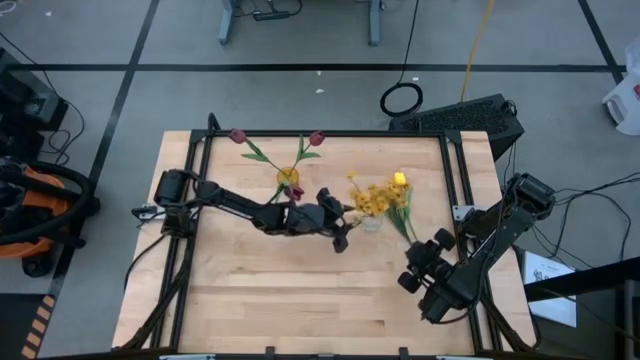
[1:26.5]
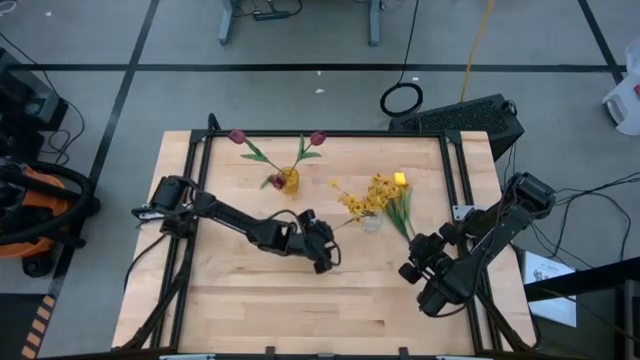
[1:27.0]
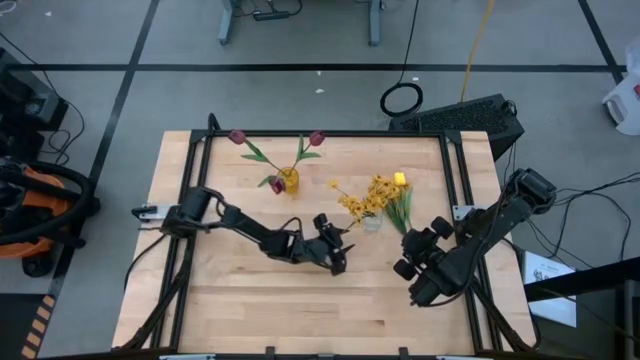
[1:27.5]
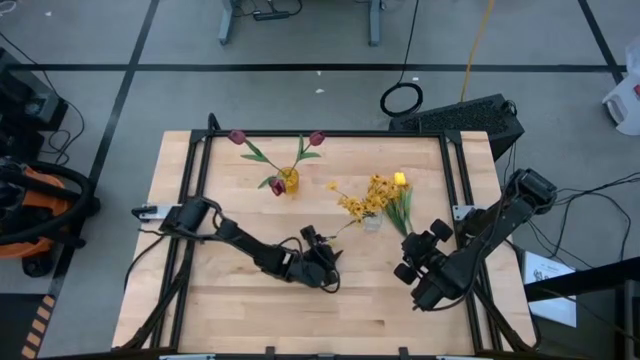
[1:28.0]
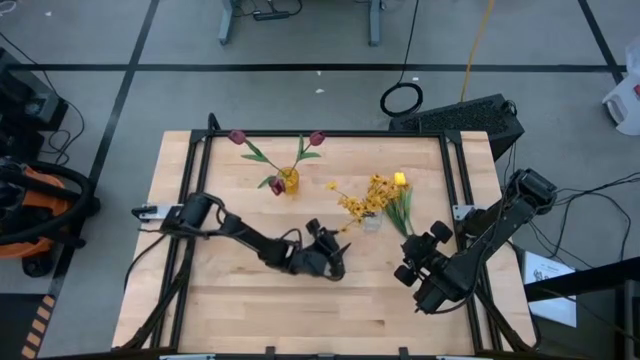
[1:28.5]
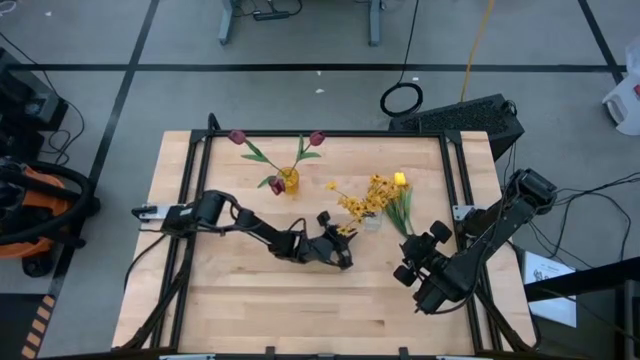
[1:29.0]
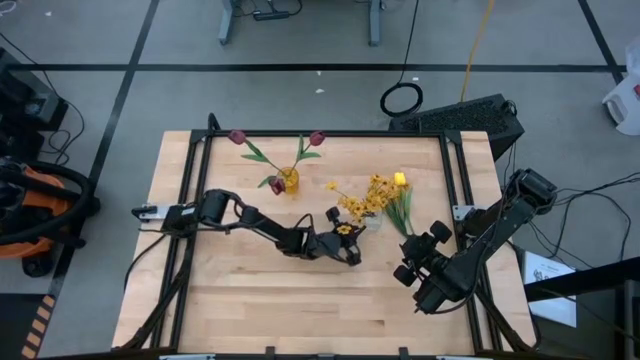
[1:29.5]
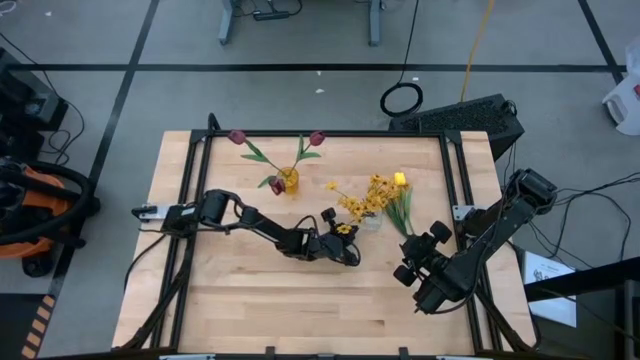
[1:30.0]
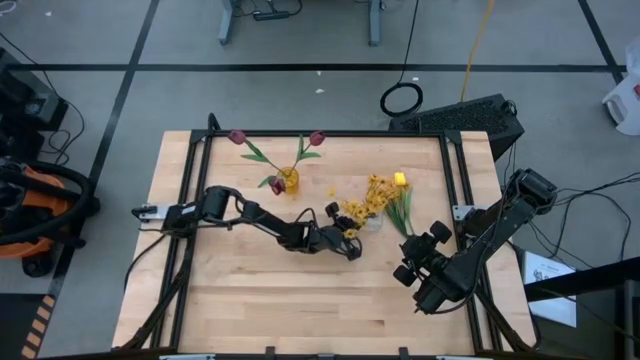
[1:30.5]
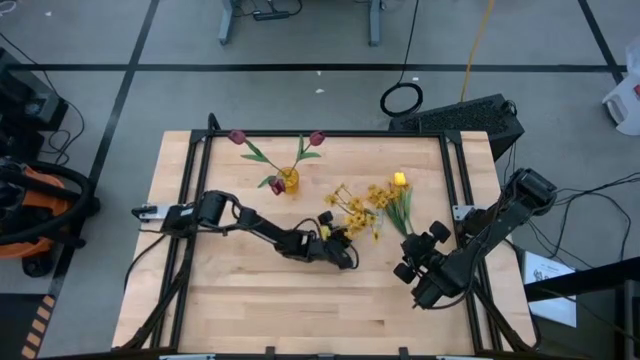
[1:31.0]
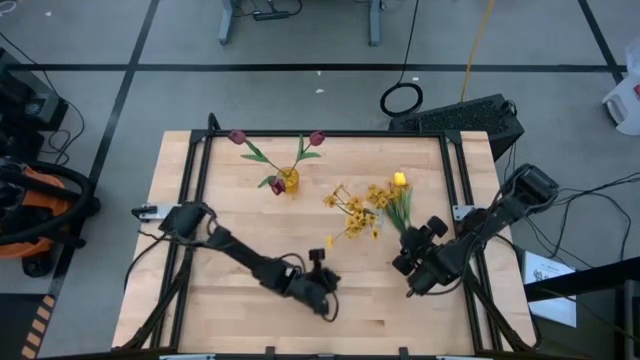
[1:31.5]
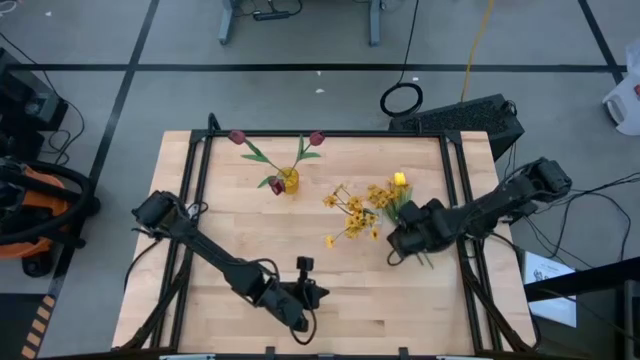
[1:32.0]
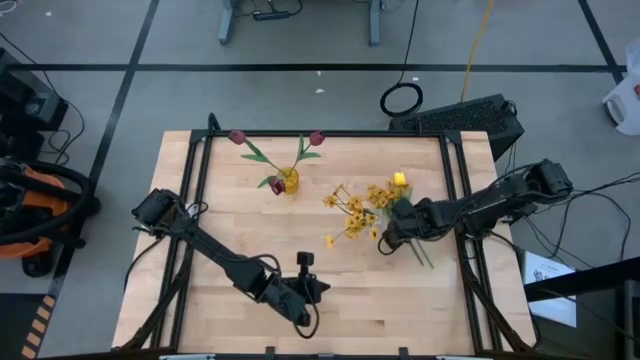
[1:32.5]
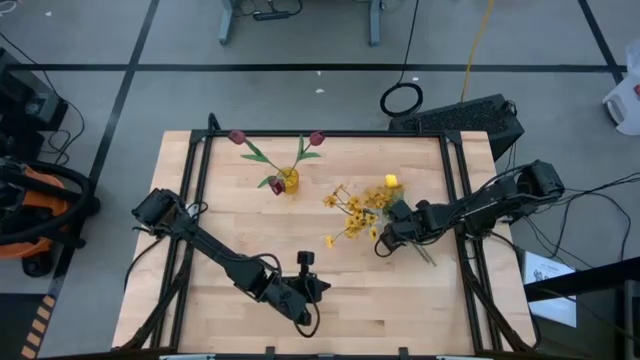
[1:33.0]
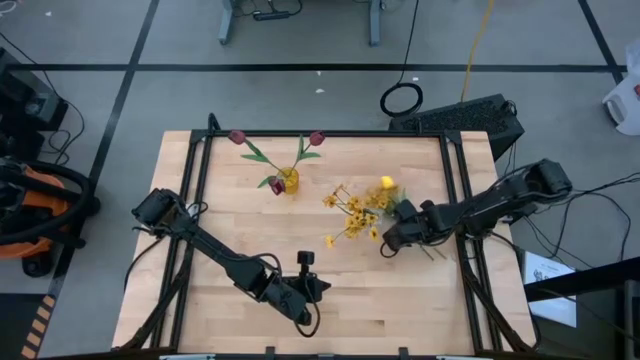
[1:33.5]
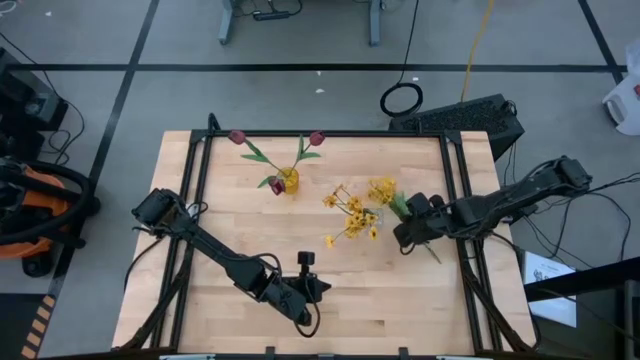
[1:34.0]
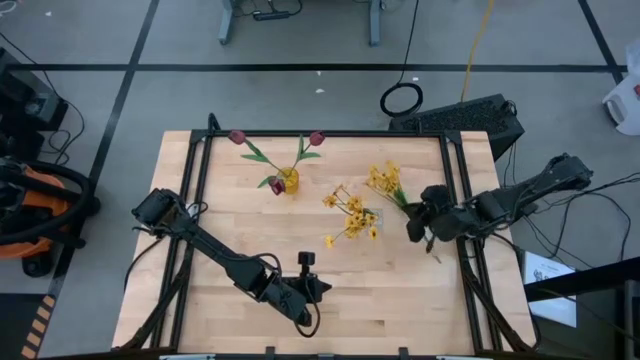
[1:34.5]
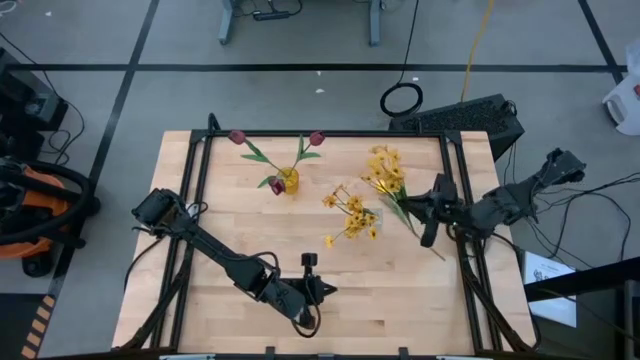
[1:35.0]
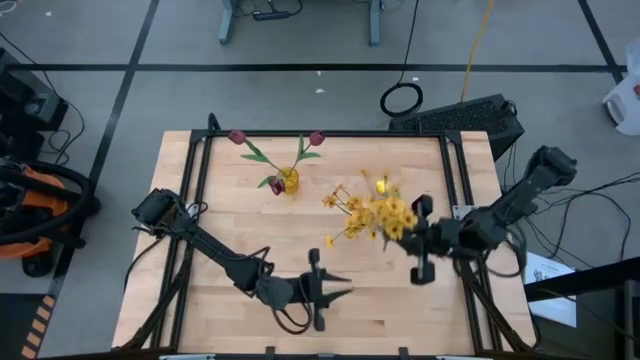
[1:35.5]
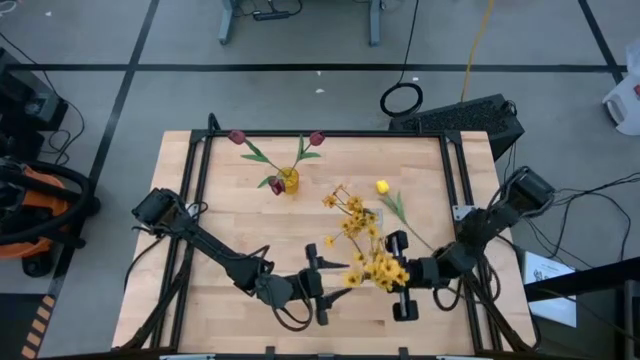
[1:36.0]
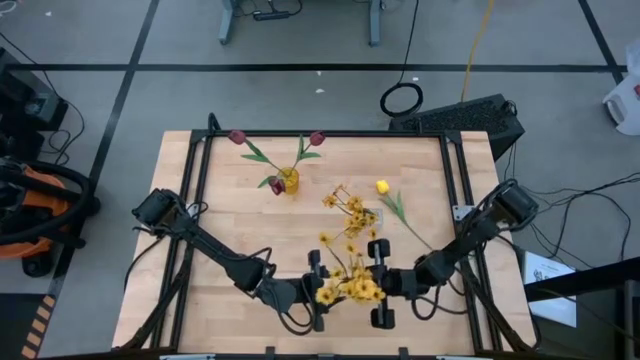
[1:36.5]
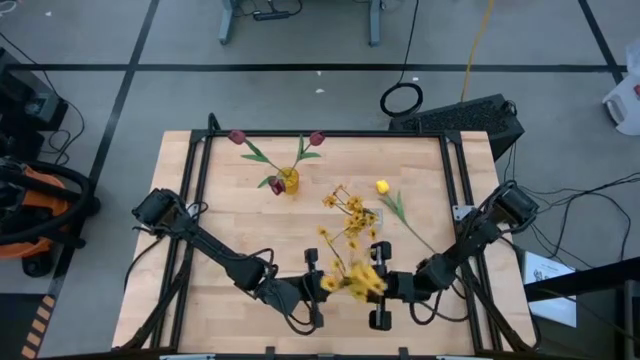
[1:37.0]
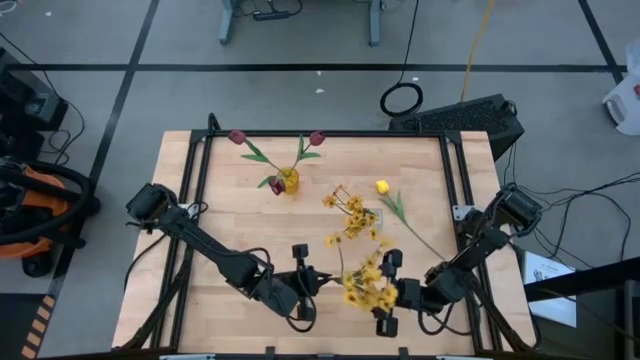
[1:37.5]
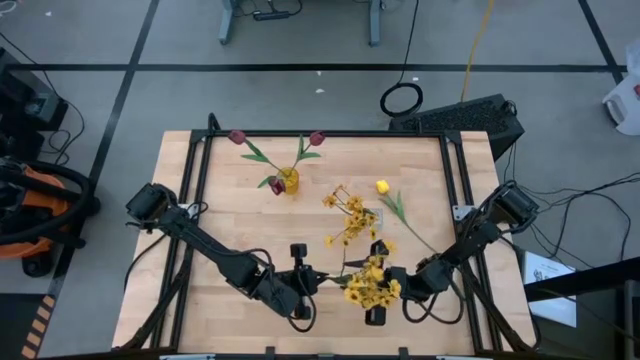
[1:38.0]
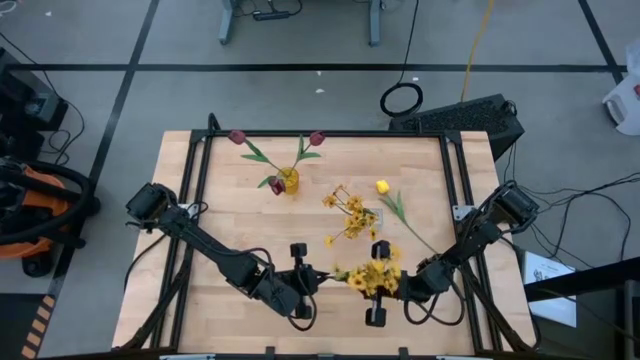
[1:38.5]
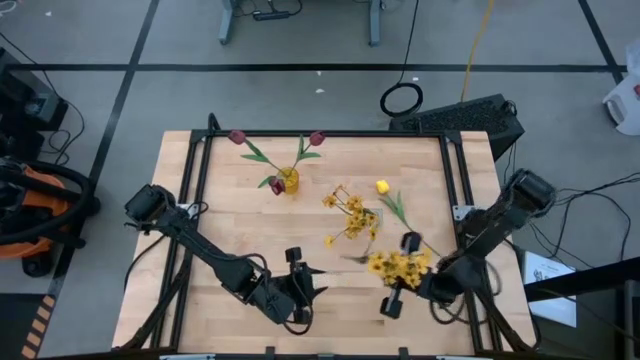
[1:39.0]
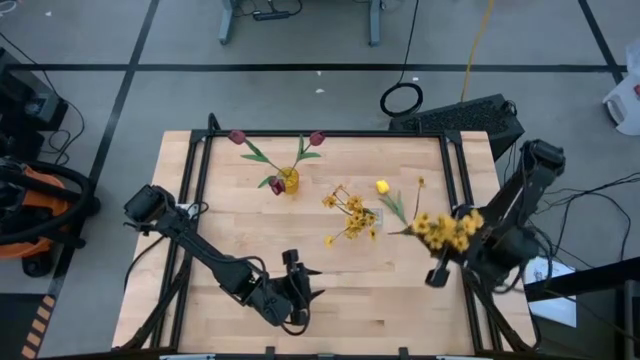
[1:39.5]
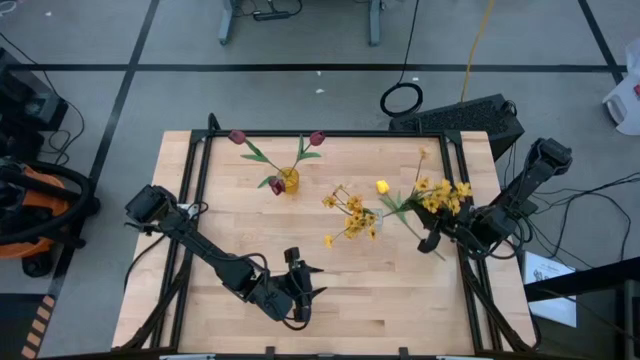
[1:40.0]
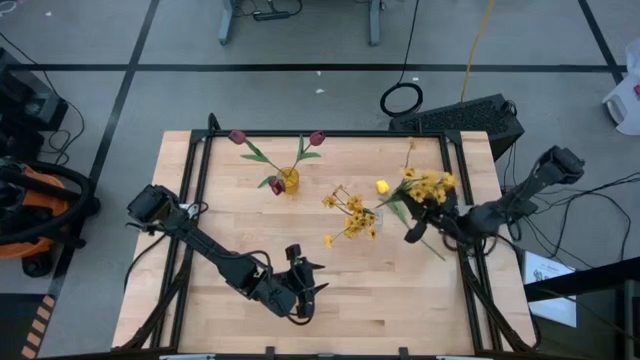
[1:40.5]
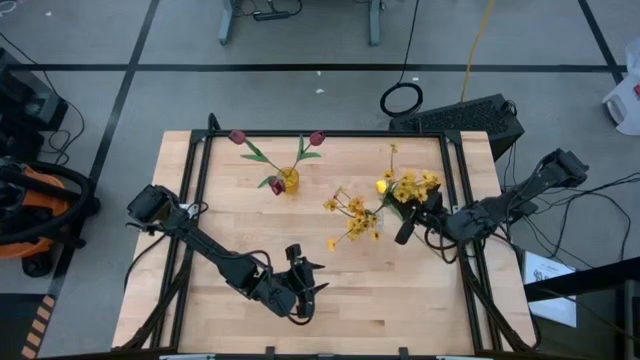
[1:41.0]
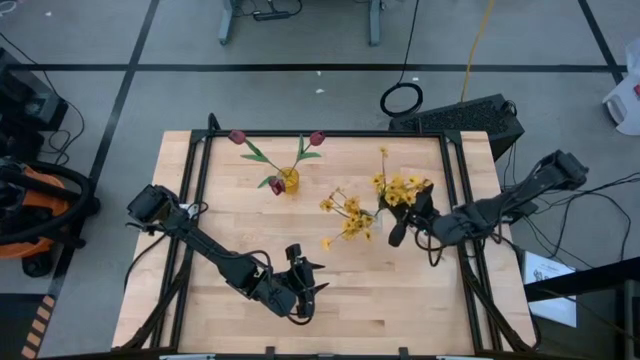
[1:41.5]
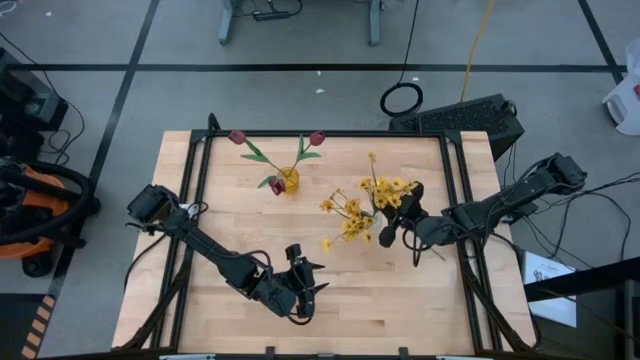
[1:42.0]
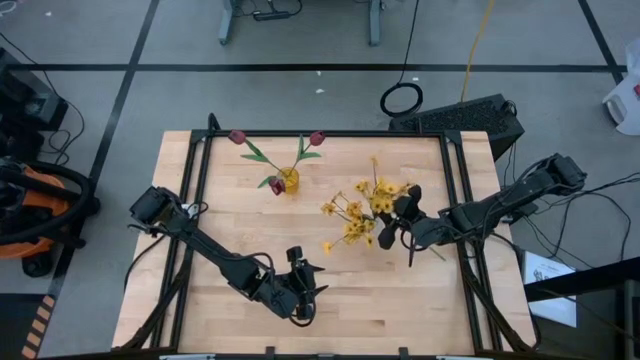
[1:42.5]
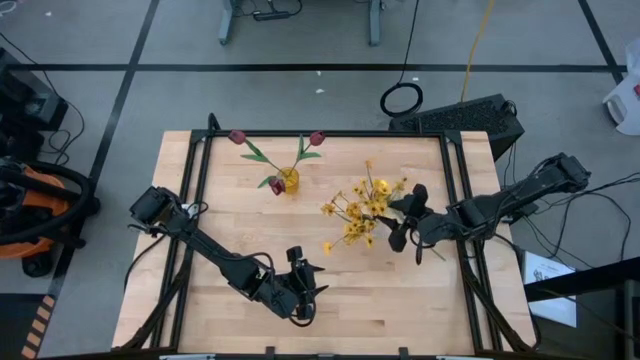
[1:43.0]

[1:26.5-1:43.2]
Task: Sort flowers into vase by color
Put the yellow flower into the transparent vase
